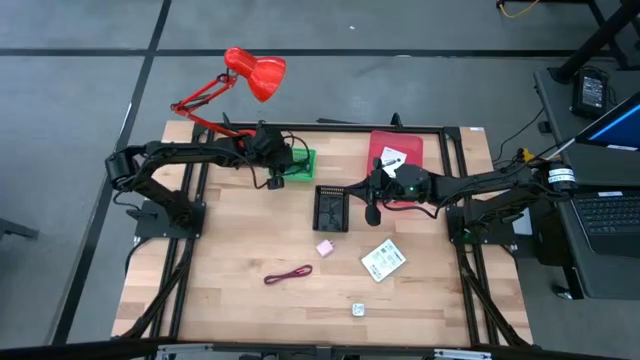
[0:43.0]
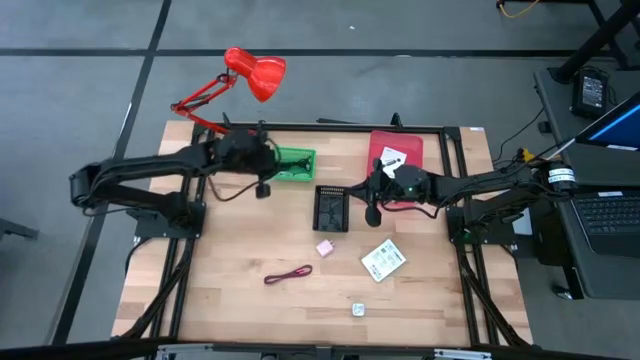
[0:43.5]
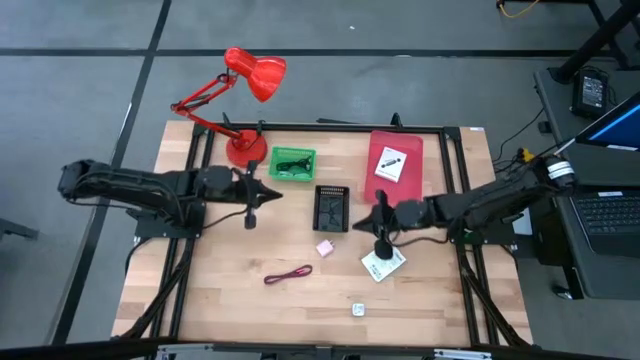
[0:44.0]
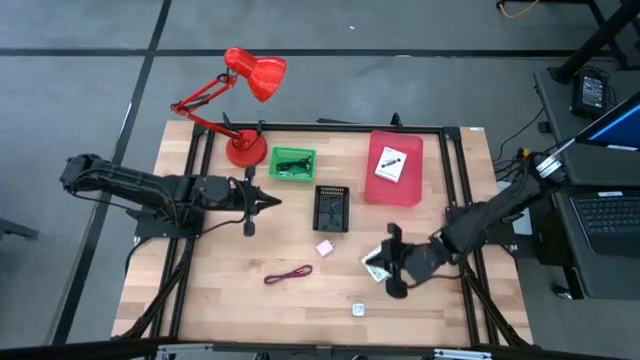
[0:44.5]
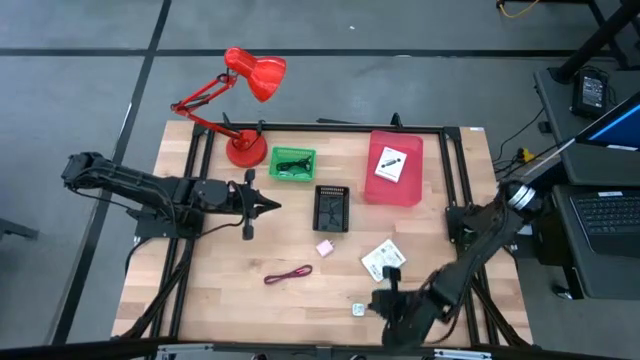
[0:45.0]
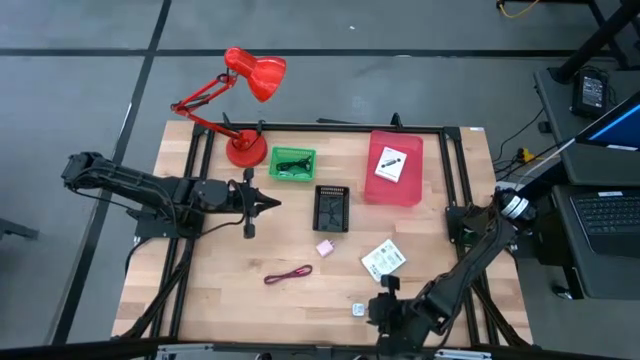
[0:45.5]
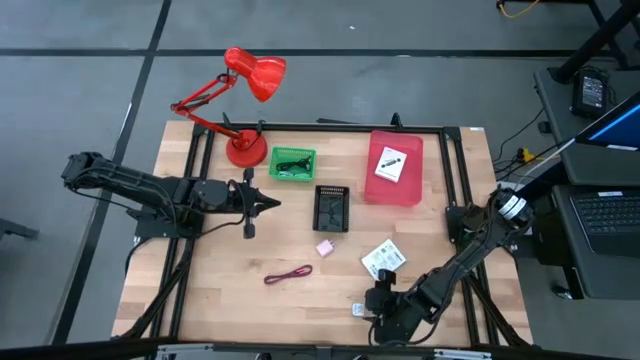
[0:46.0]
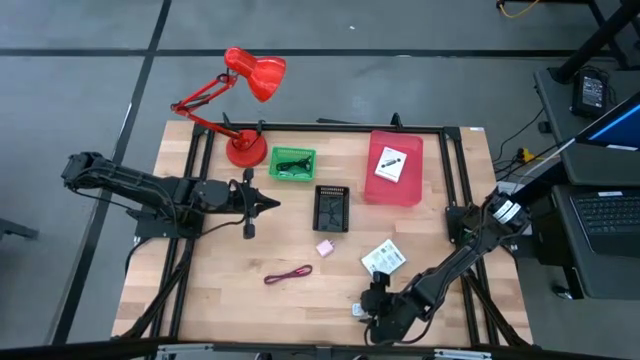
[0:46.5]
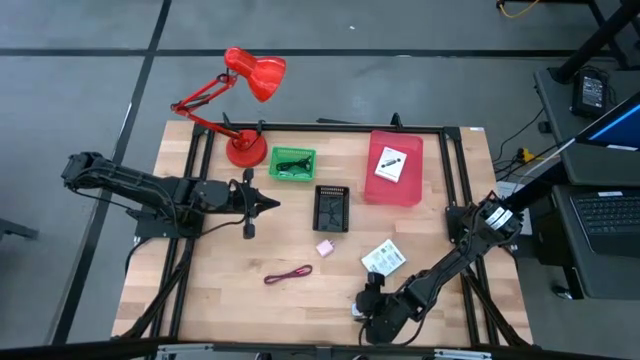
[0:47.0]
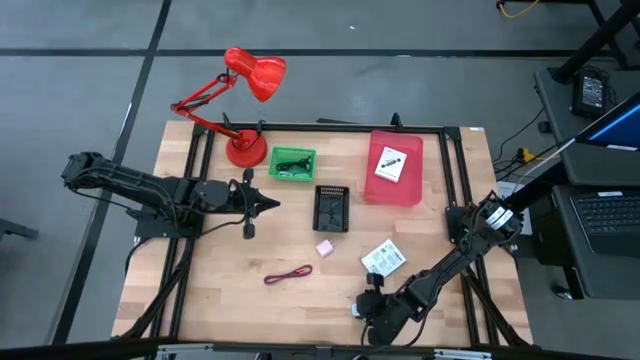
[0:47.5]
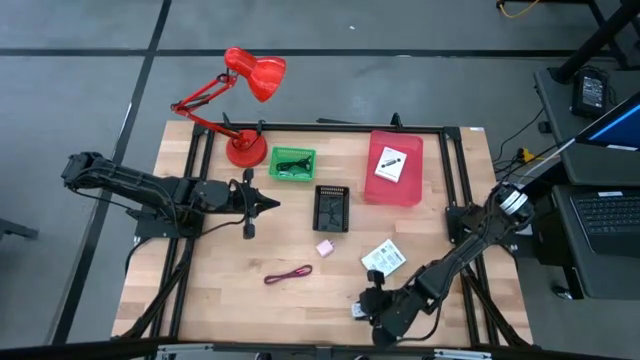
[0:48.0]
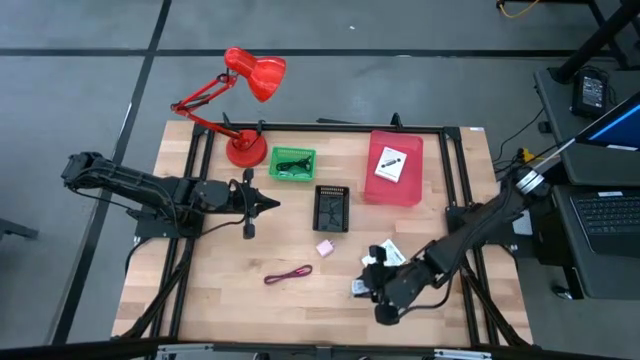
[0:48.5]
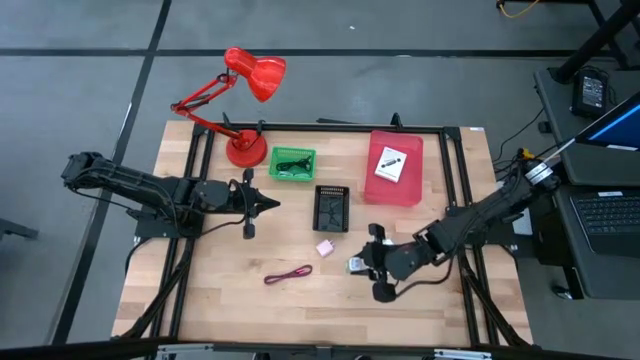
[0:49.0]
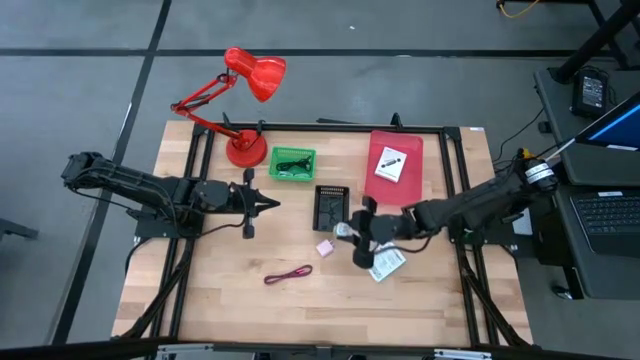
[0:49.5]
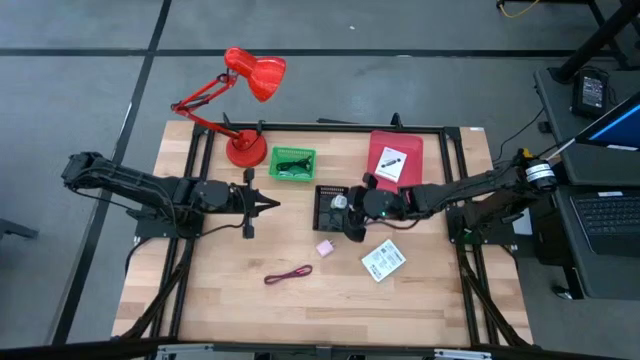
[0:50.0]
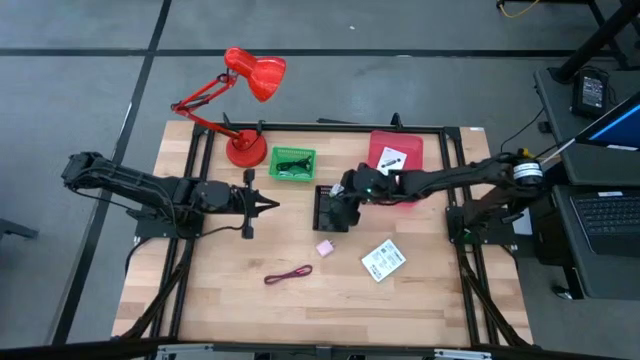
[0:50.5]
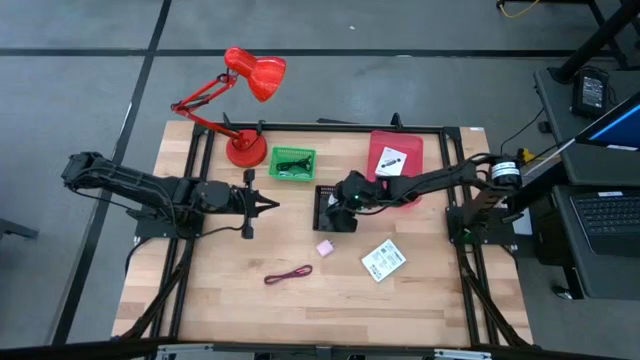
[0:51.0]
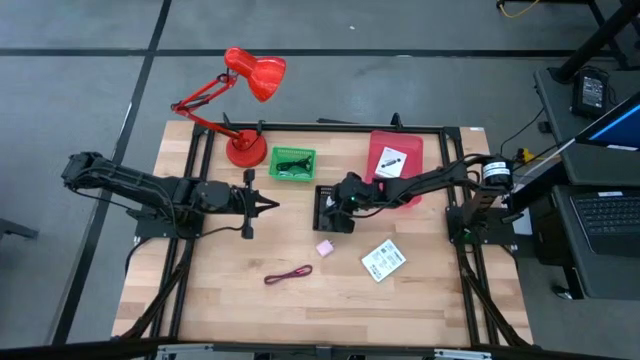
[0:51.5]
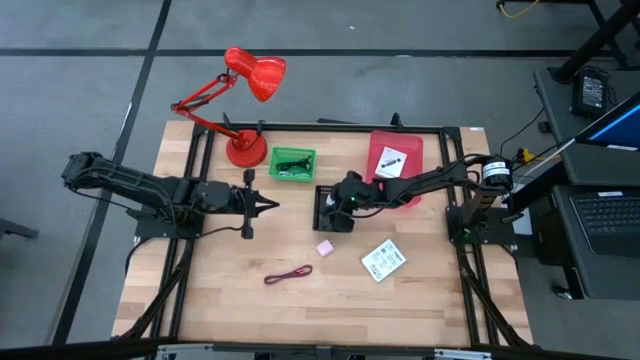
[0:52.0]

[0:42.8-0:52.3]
Task: Pick and place items into bin
Put the green charger adapter into the black bin

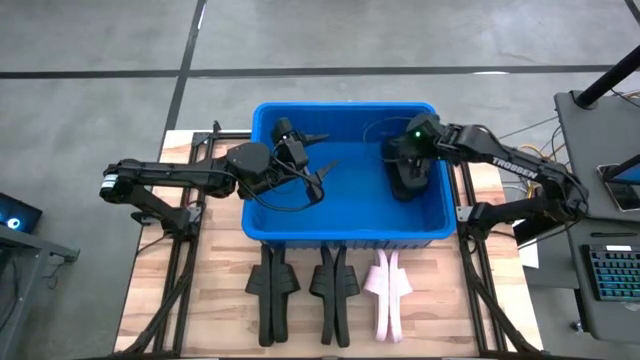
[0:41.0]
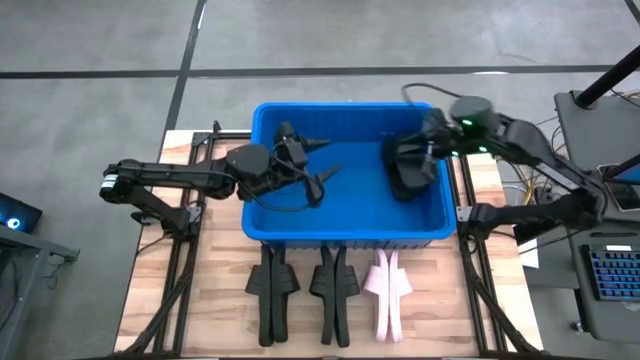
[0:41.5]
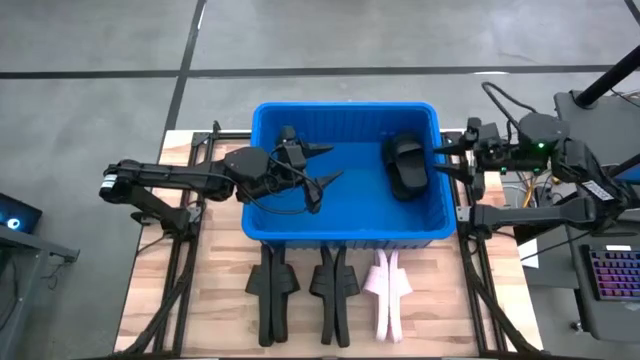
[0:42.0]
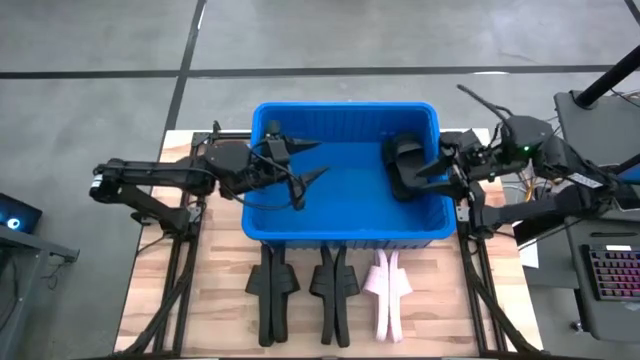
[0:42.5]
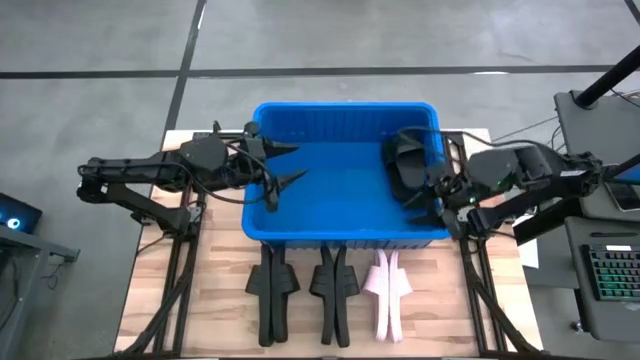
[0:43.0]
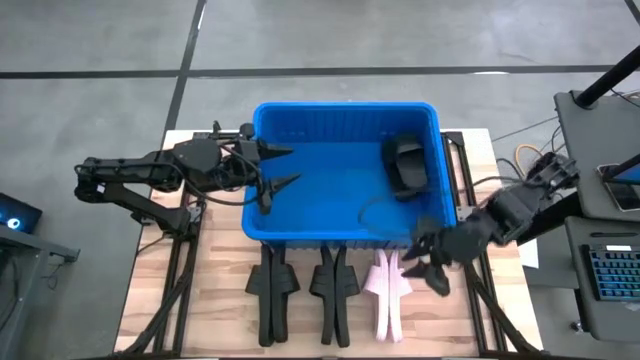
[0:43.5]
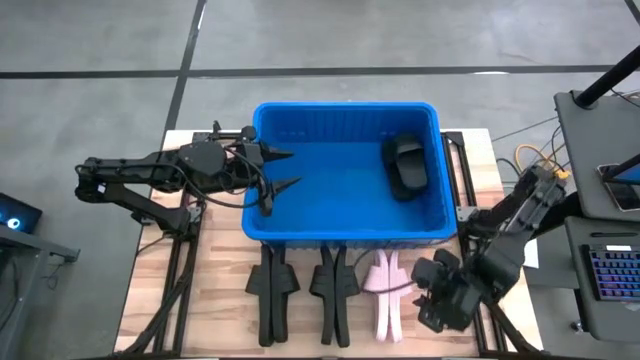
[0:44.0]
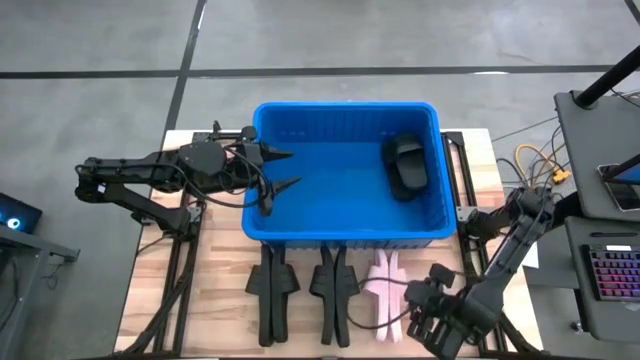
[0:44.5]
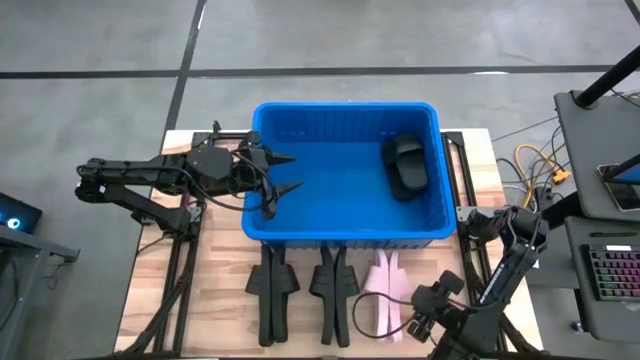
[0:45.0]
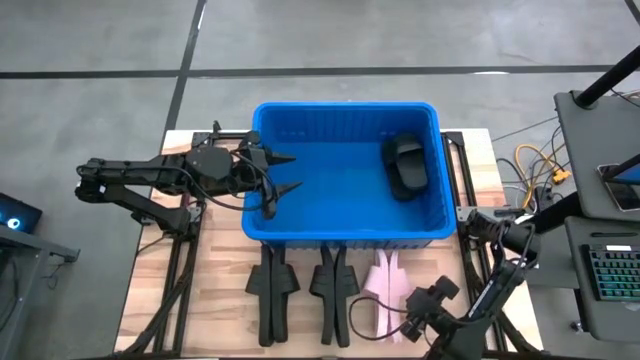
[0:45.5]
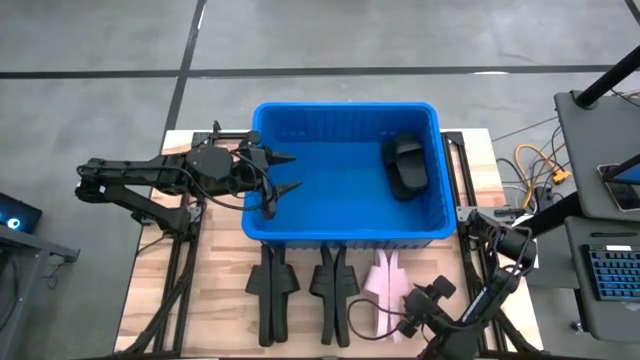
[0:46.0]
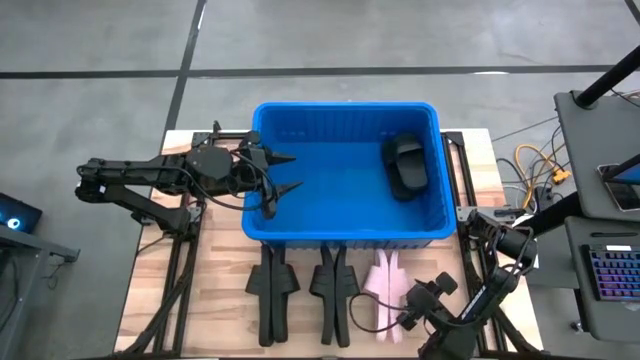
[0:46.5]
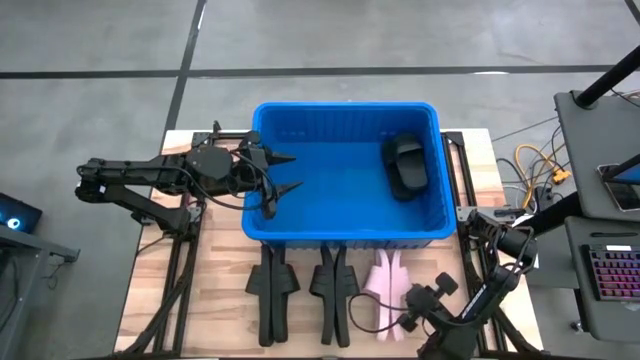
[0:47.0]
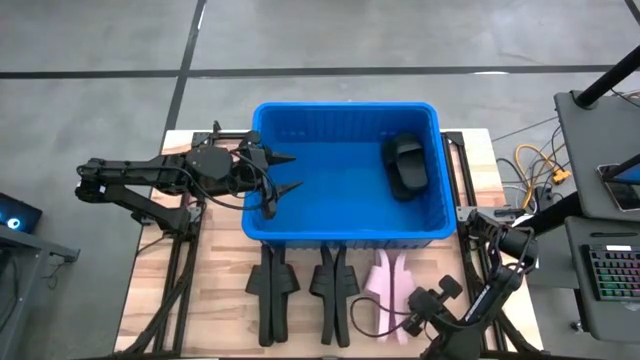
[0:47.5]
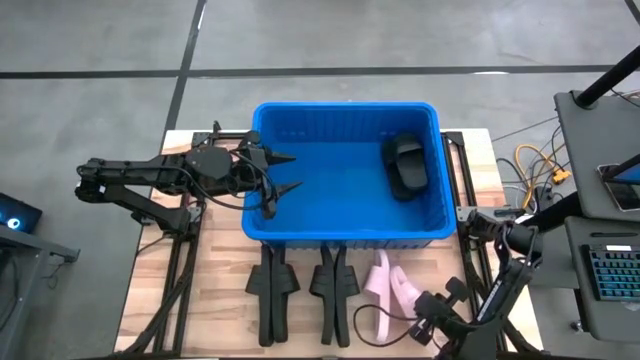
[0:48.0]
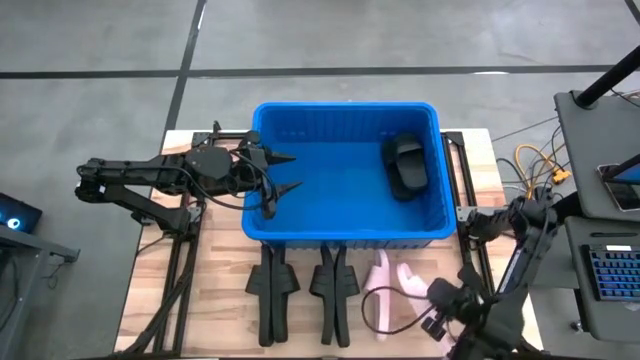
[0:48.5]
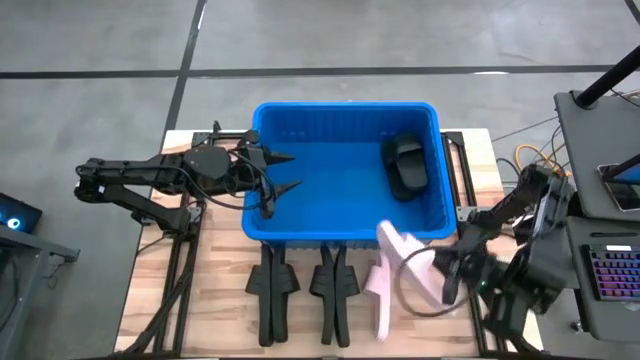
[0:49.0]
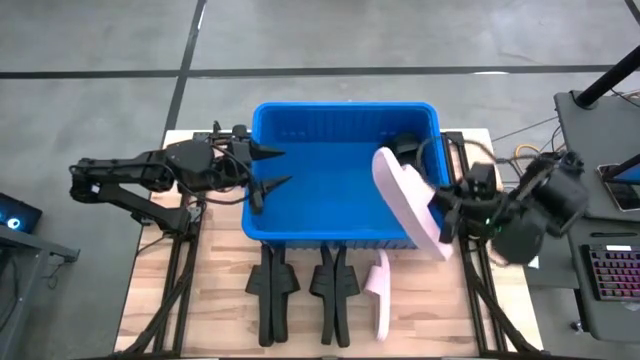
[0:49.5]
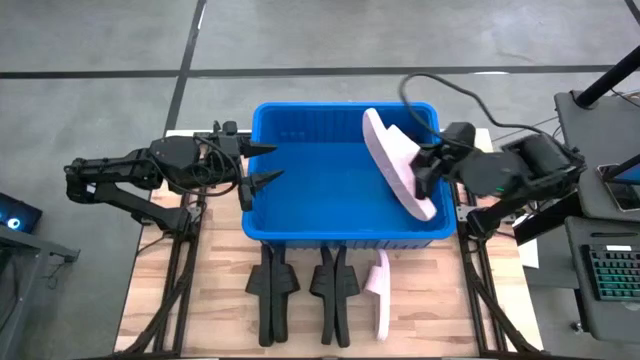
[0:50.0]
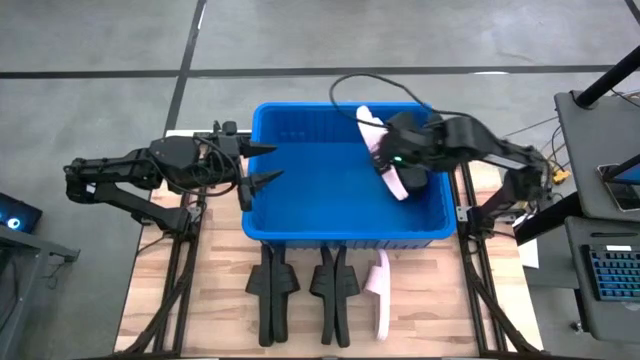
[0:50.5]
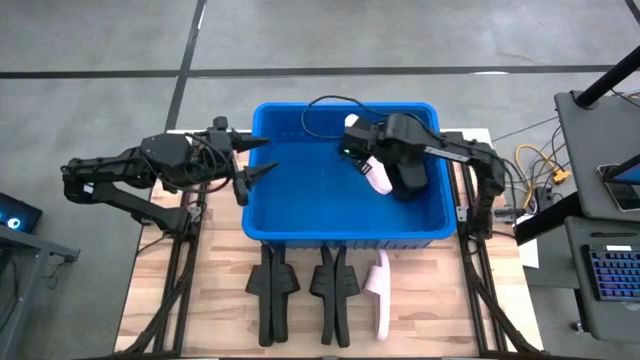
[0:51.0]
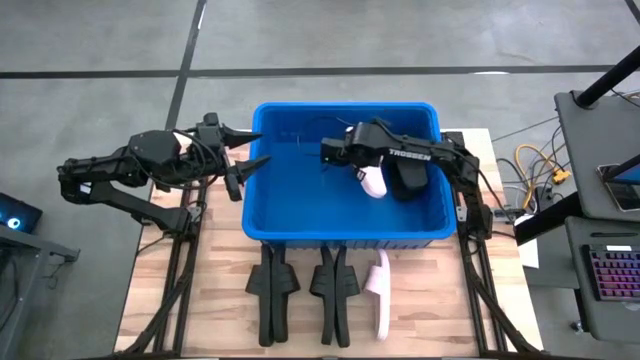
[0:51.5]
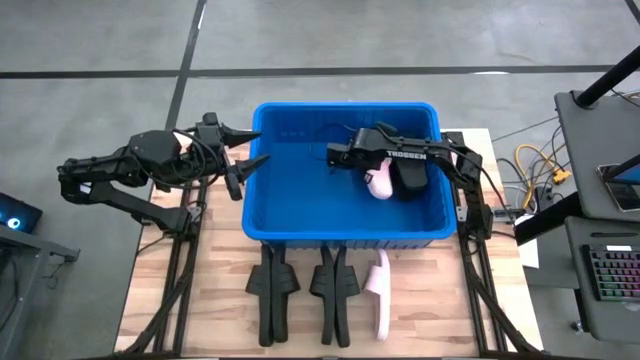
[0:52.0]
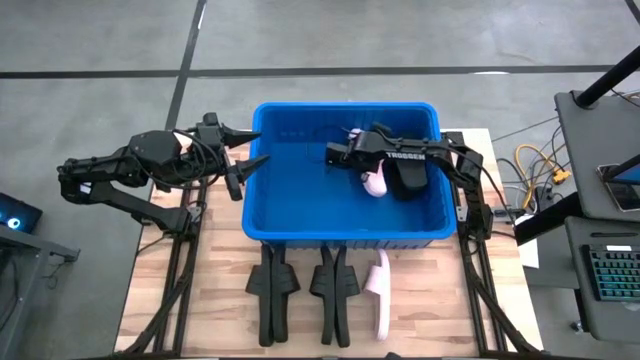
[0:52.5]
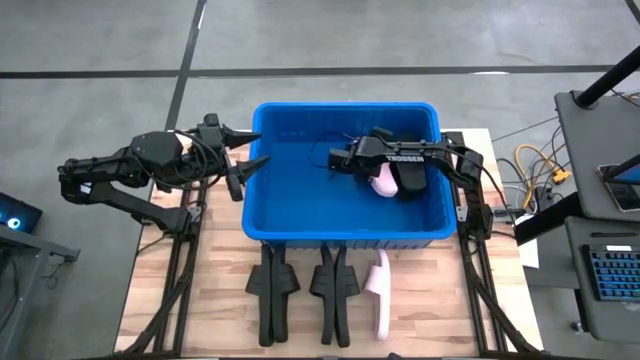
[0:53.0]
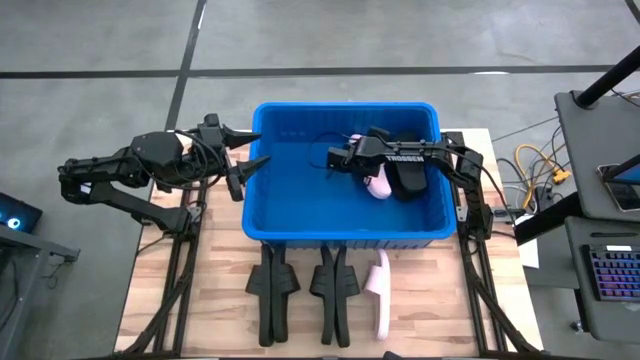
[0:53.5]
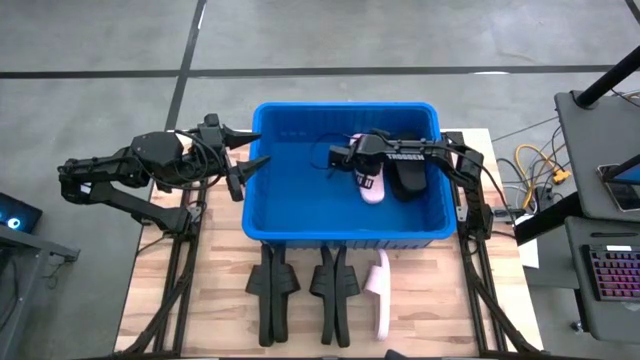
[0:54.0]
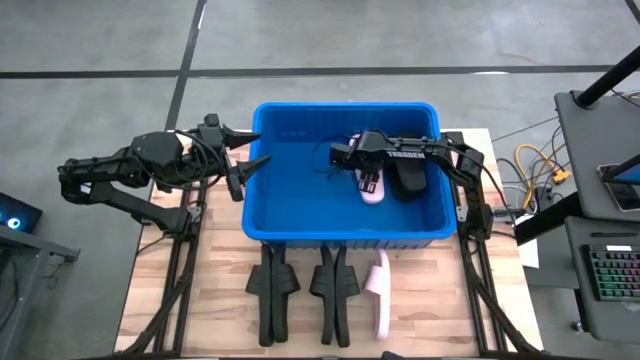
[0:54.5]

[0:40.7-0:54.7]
Task: Pick and place slides into bin
Put the pink slide into the blue bin
